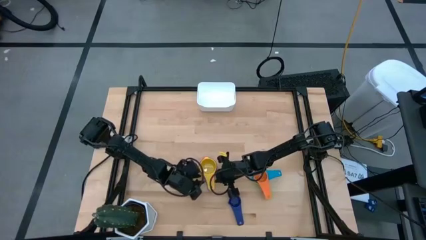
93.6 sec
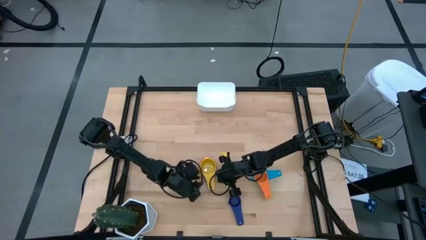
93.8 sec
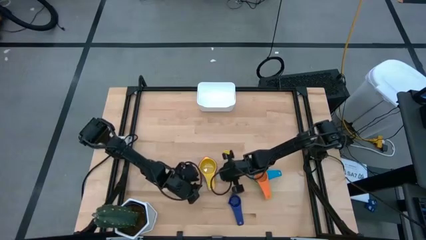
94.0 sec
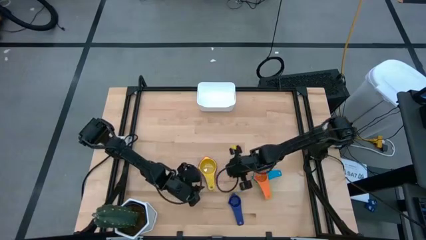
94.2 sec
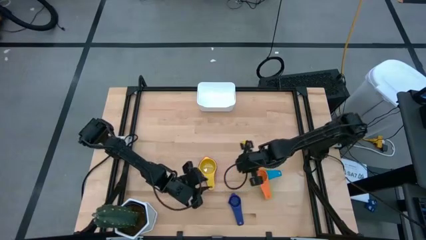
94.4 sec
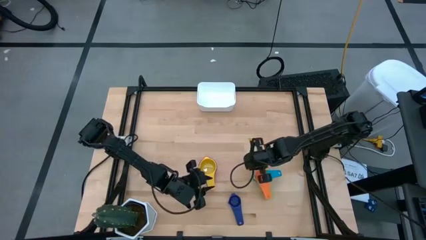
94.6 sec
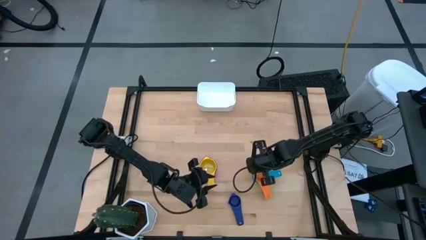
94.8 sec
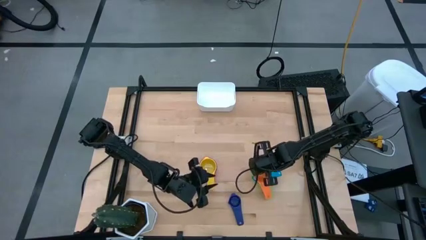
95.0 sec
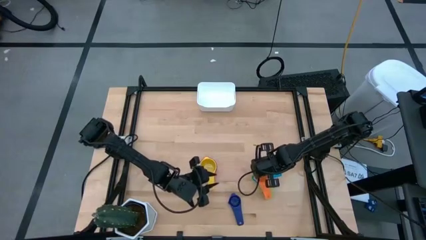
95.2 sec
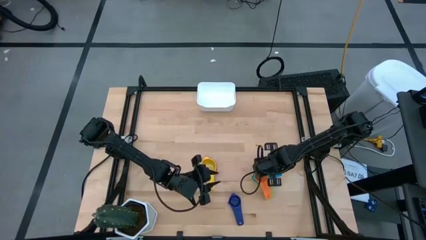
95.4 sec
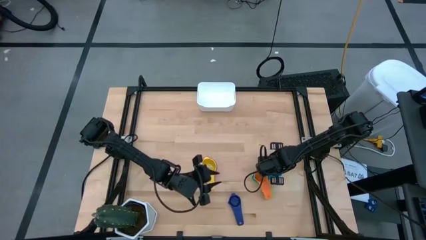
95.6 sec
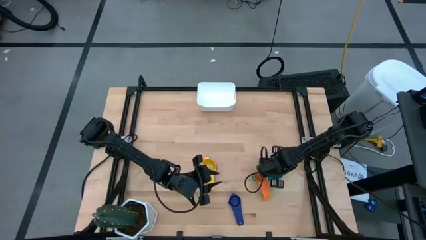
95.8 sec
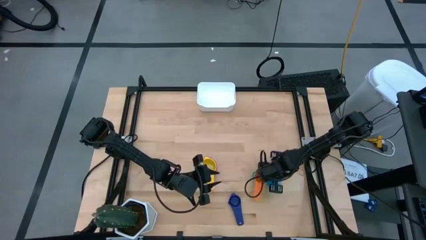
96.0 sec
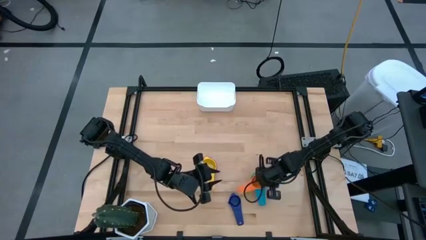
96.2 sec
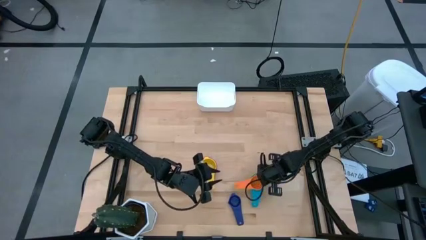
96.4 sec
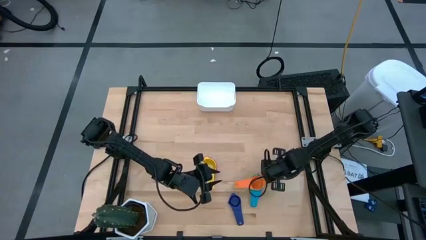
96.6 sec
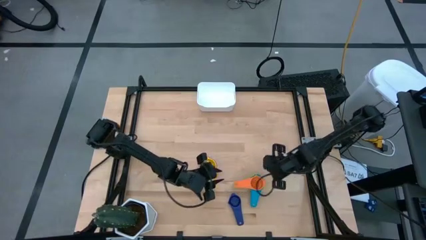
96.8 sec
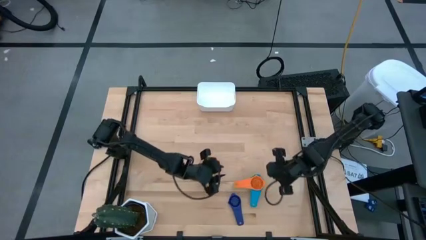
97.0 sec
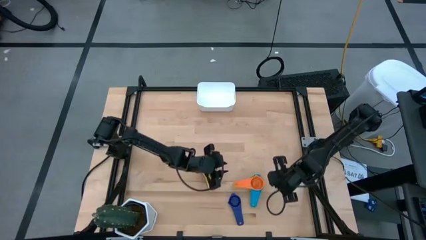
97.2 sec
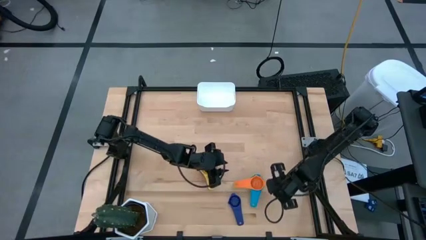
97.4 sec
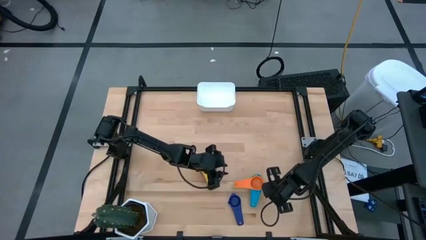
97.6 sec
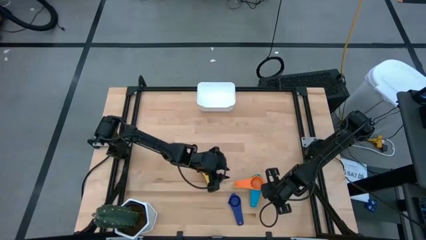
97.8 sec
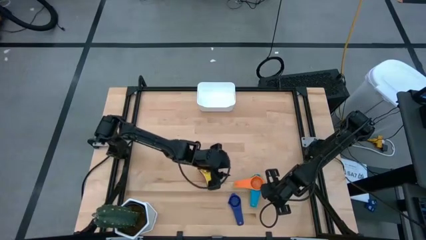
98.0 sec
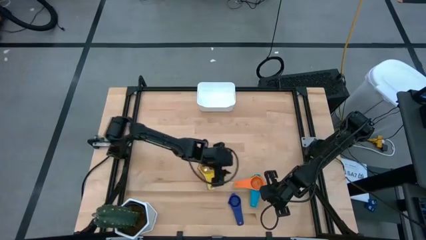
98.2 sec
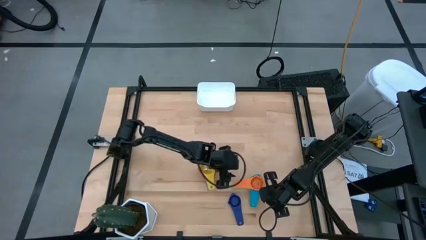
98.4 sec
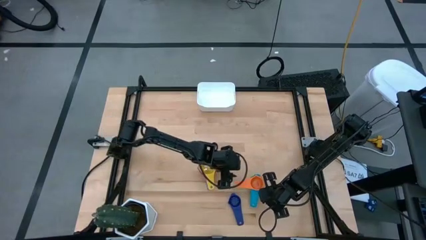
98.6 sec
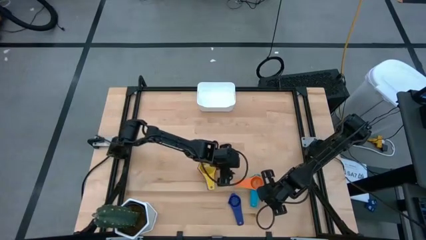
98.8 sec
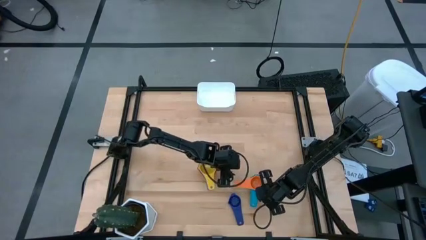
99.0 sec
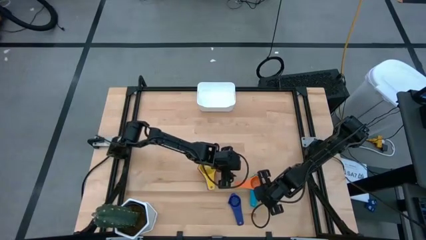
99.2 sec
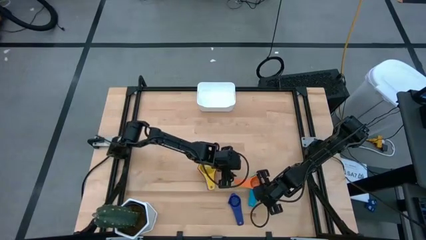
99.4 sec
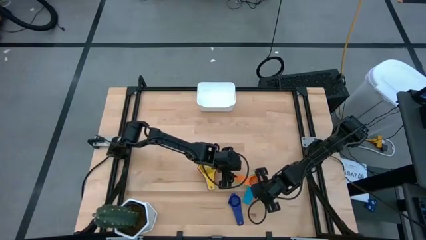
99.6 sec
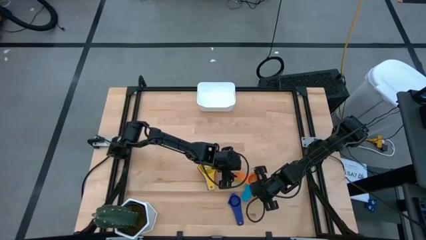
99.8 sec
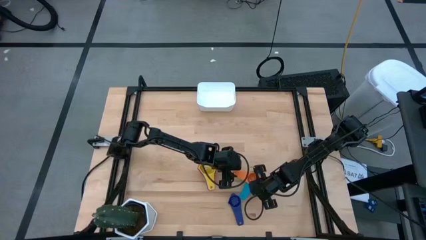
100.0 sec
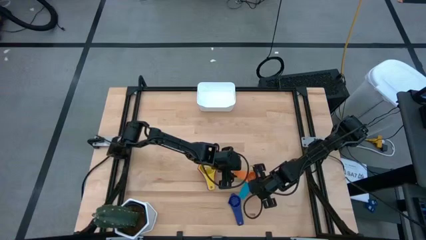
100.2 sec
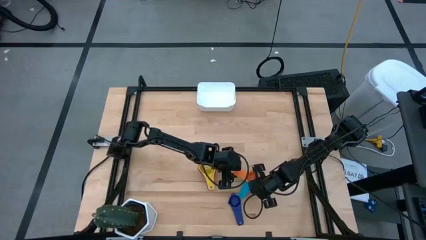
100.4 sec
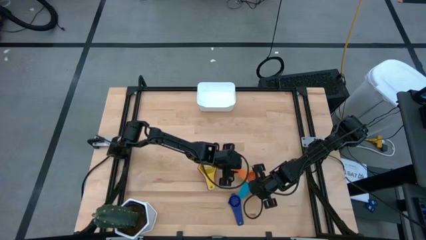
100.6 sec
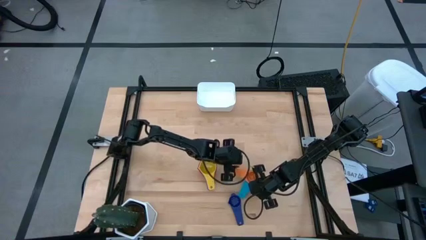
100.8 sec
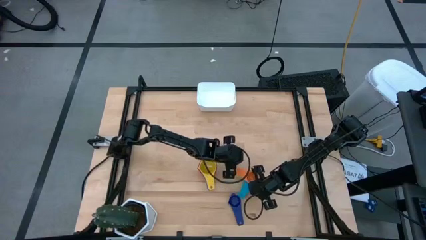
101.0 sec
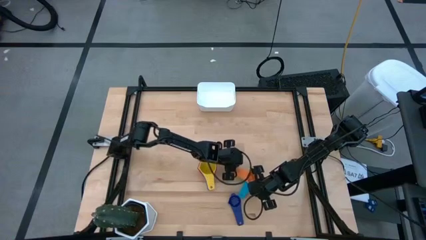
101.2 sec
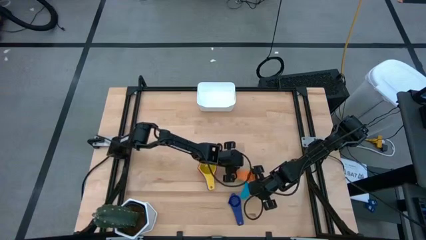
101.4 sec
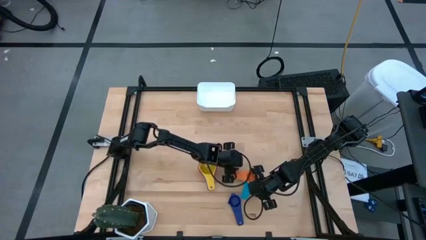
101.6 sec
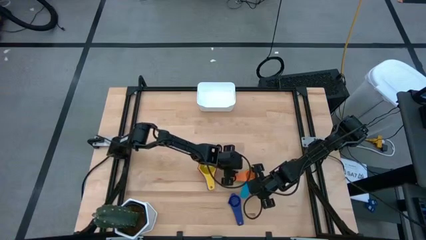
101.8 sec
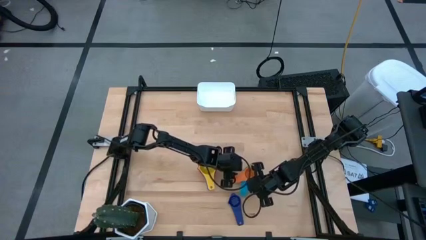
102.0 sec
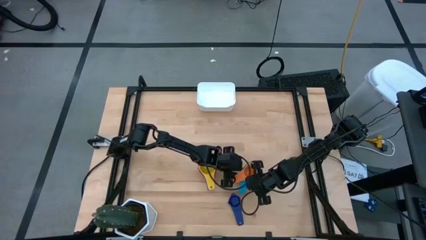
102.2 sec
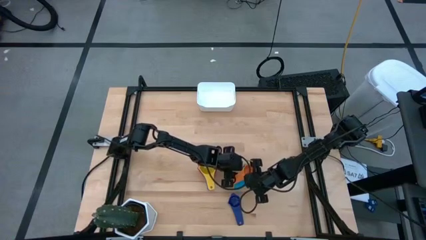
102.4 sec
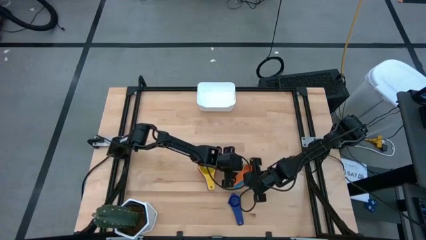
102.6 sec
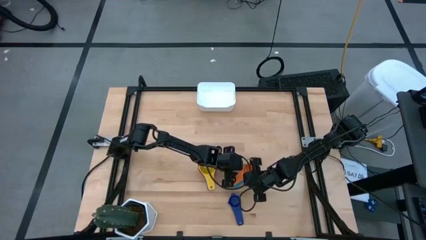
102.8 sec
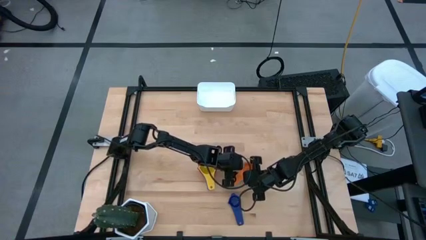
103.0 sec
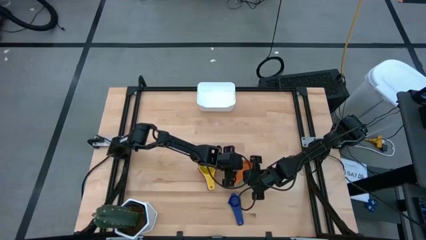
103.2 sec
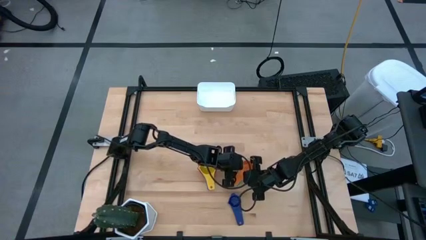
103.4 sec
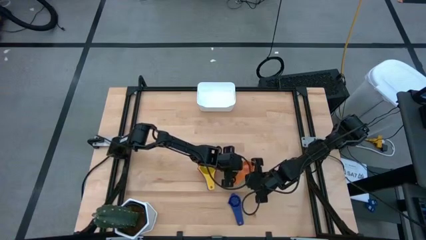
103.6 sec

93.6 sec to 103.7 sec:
Task: Nest measuring cups in basket
Adjust the right nested measuring cups

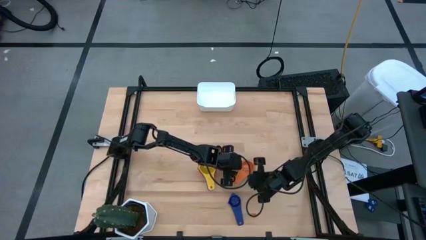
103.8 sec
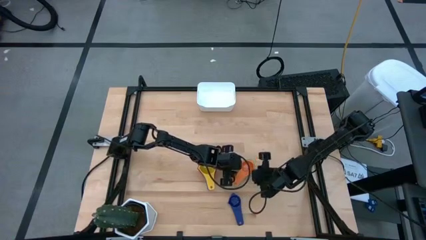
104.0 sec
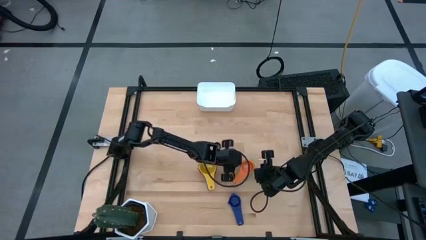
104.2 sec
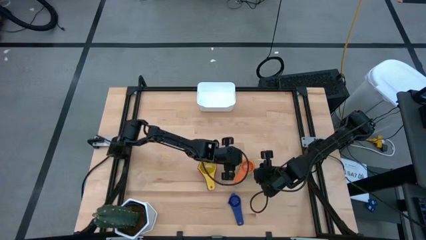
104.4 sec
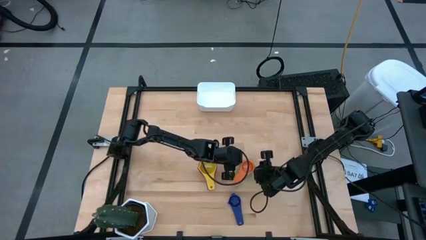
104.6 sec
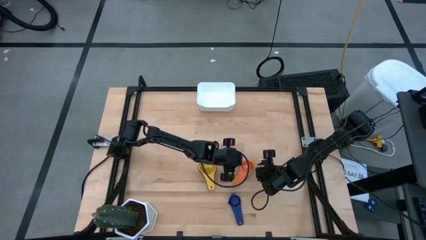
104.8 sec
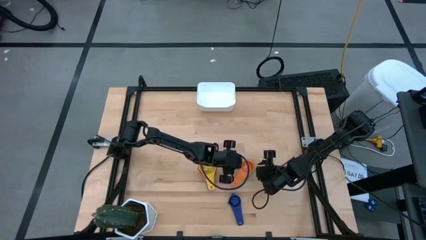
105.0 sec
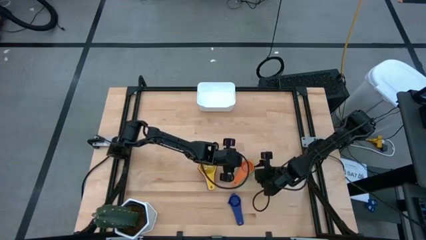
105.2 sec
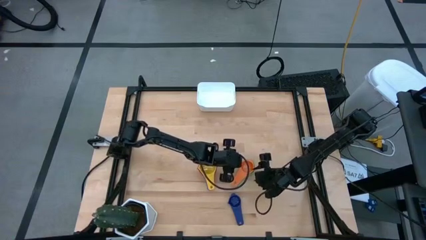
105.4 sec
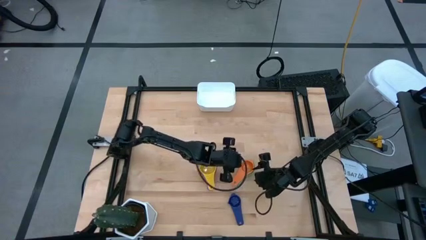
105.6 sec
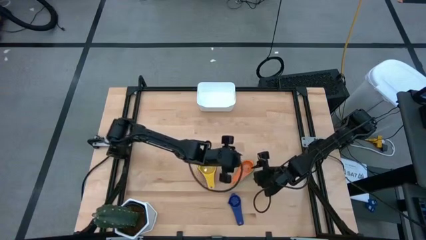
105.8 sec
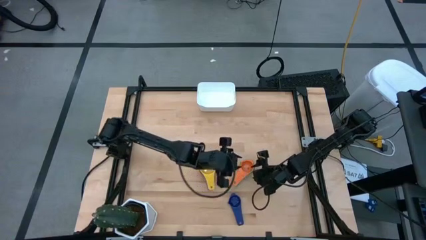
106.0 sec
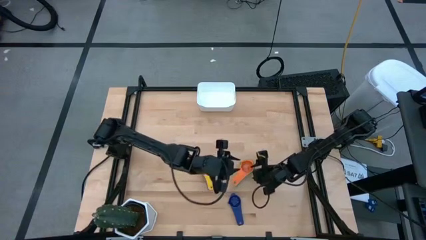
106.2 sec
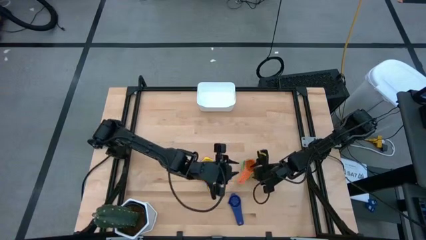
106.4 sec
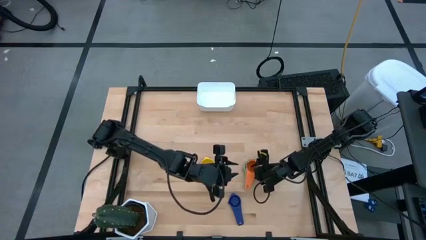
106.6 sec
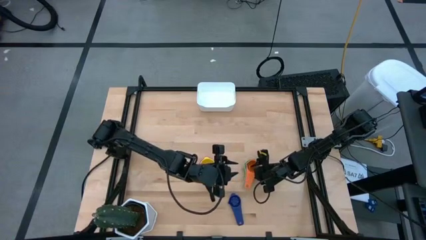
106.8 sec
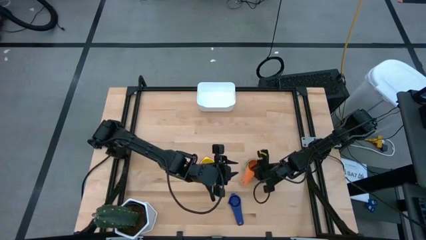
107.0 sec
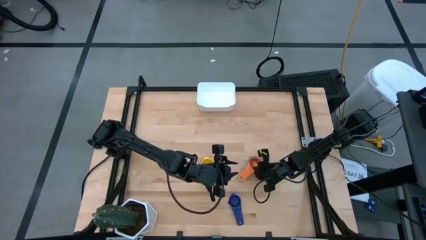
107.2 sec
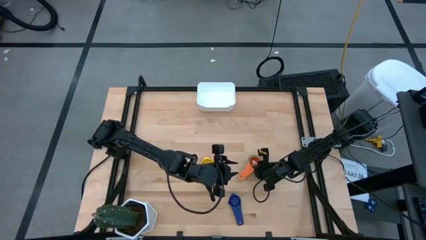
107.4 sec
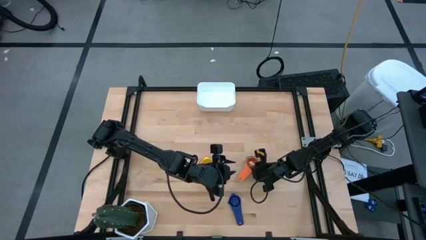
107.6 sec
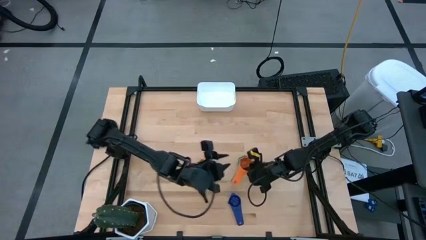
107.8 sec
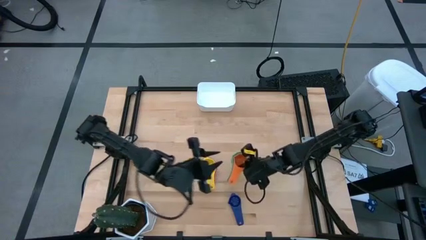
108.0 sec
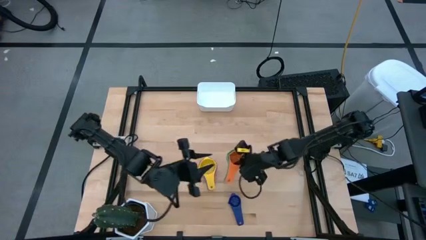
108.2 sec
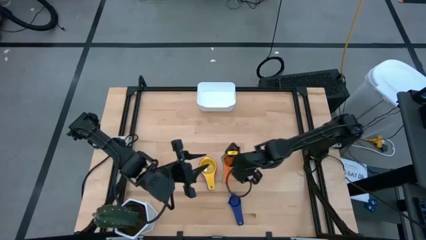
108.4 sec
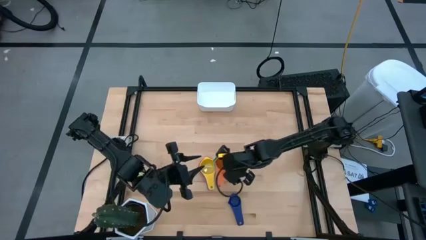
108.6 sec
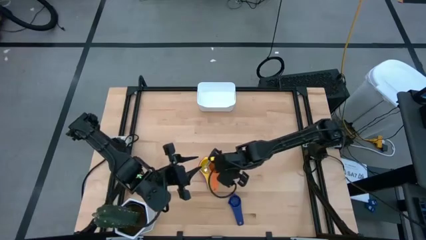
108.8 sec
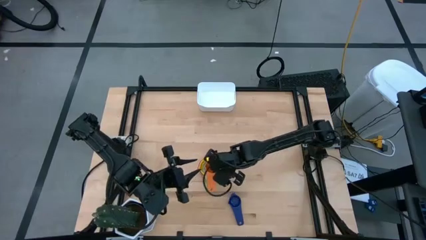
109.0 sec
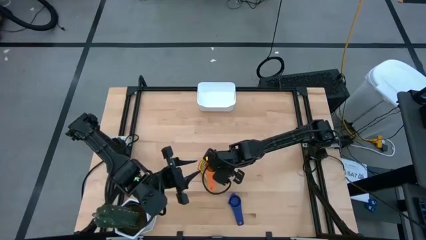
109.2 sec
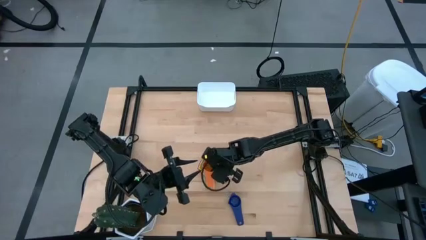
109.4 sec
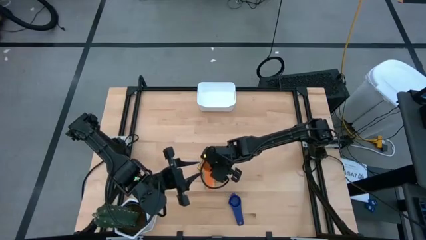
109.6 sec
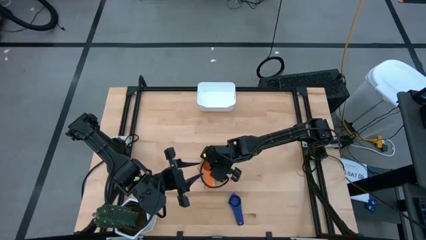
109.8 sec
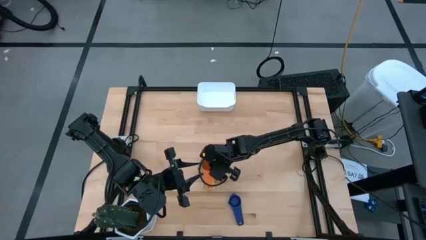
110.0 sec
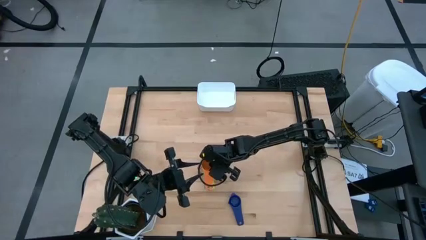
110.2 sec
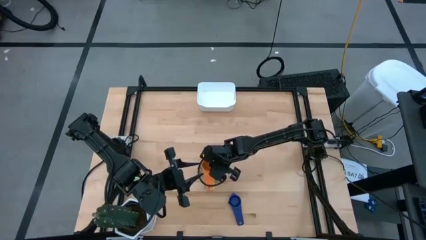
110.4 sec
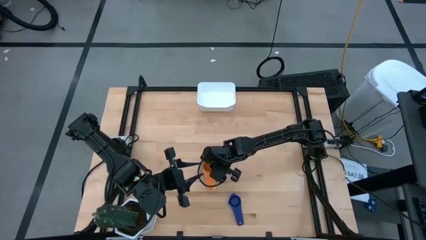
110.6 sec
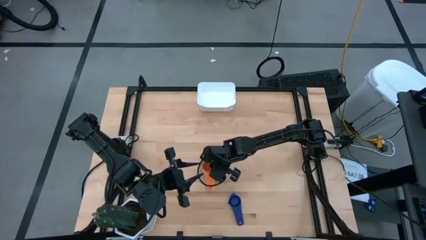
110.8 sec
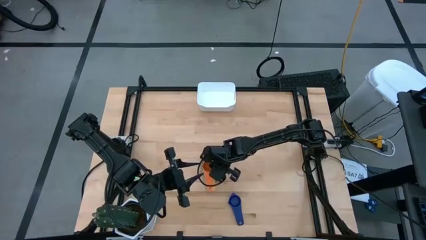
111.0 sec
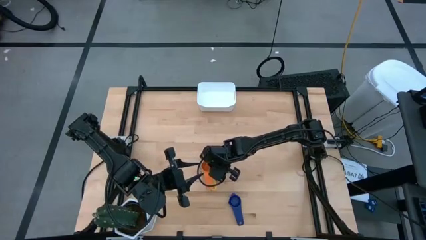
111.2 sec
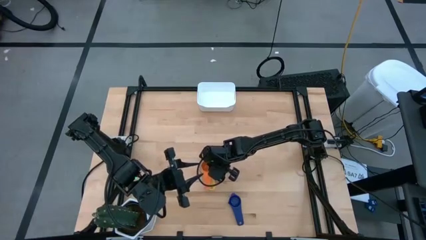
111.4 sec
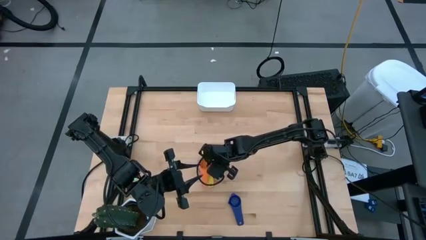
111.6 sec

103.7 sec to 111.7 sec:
Stack the right nested measuring cups on top of the yellow measuring cup
